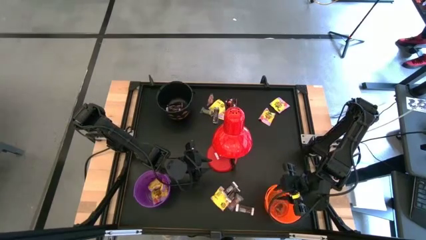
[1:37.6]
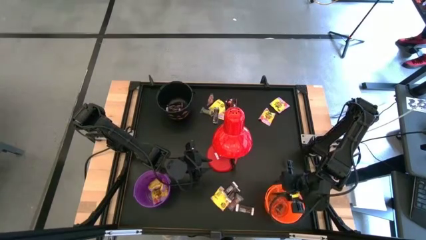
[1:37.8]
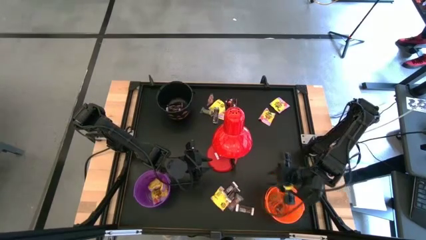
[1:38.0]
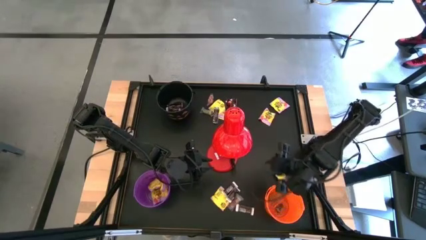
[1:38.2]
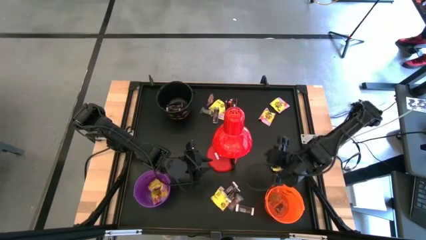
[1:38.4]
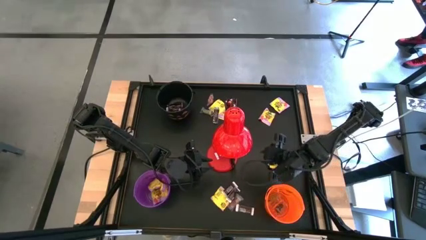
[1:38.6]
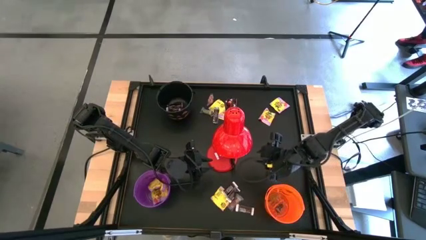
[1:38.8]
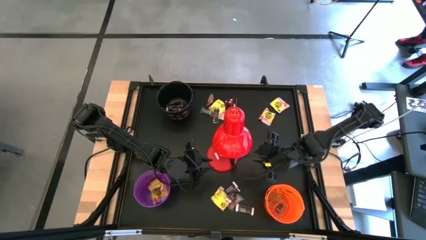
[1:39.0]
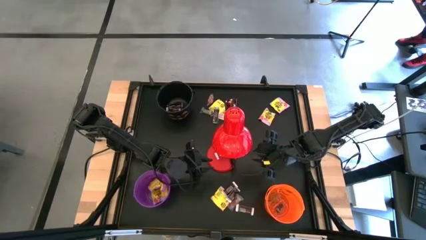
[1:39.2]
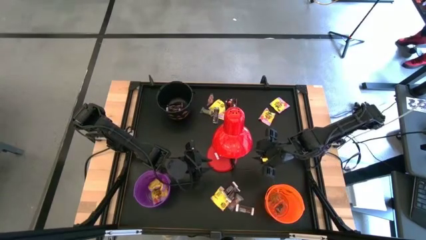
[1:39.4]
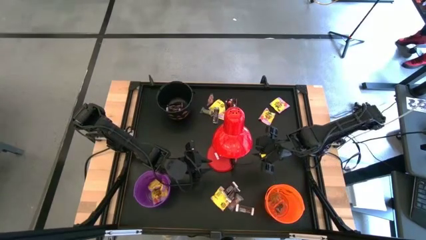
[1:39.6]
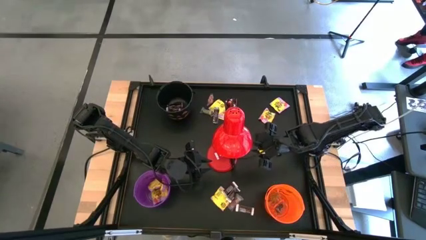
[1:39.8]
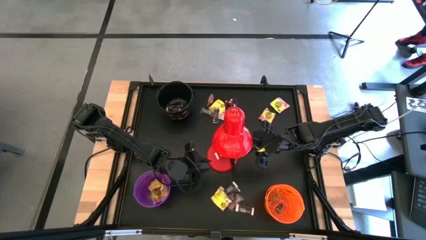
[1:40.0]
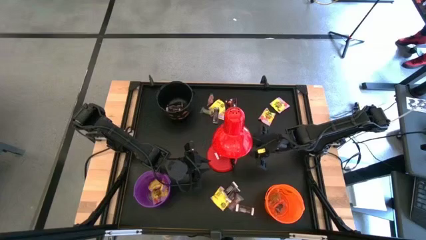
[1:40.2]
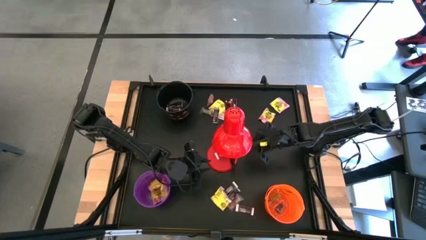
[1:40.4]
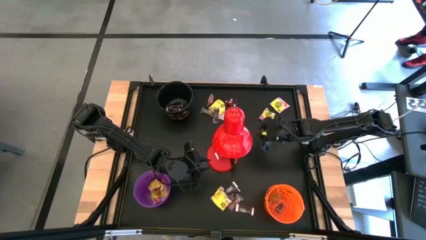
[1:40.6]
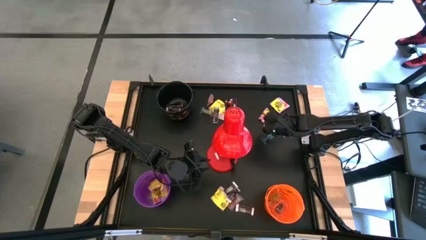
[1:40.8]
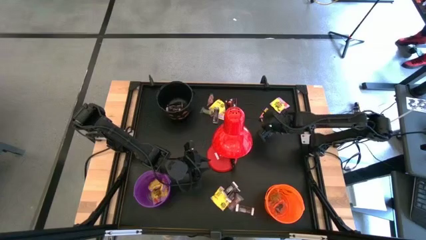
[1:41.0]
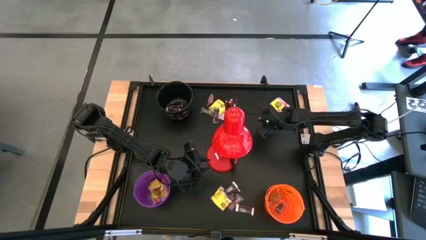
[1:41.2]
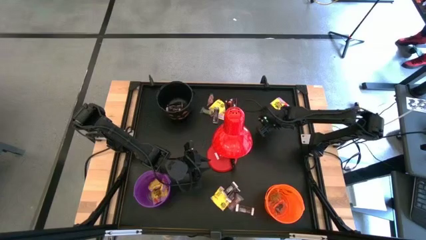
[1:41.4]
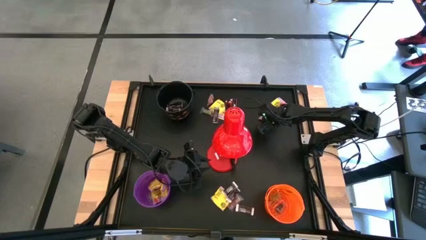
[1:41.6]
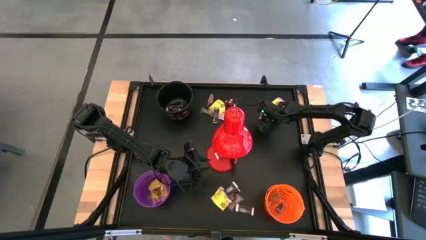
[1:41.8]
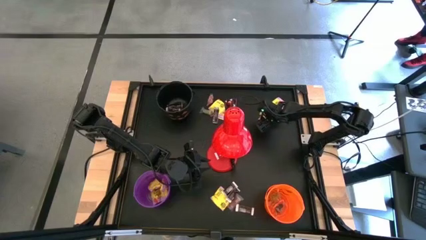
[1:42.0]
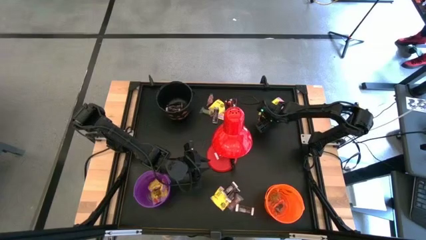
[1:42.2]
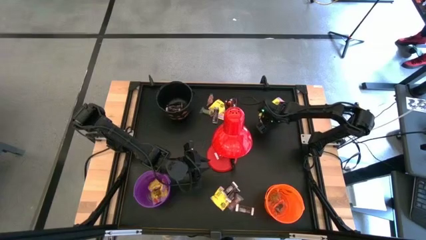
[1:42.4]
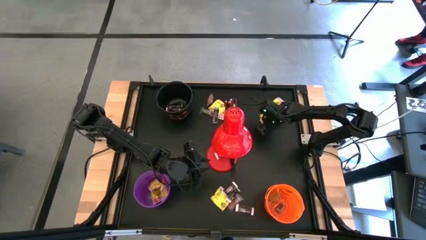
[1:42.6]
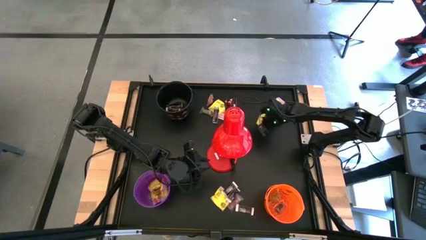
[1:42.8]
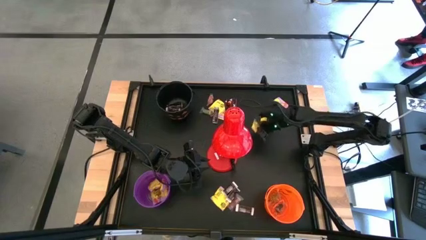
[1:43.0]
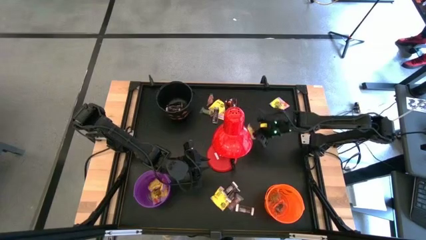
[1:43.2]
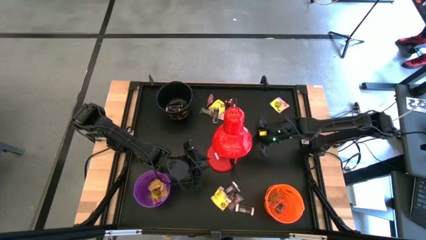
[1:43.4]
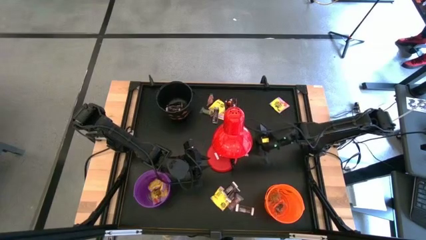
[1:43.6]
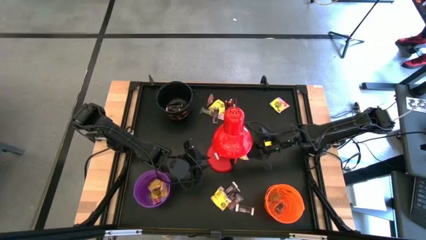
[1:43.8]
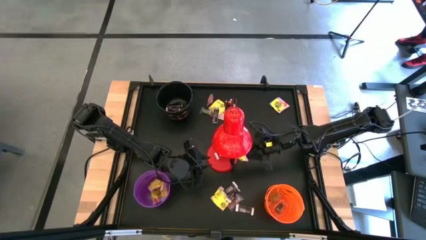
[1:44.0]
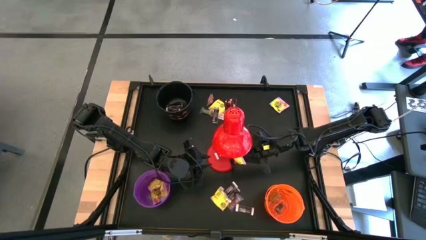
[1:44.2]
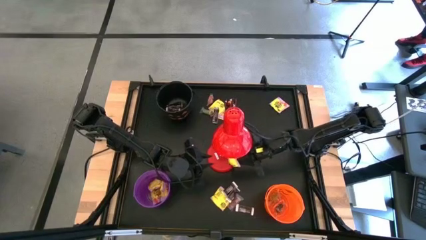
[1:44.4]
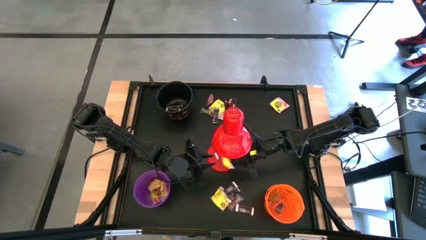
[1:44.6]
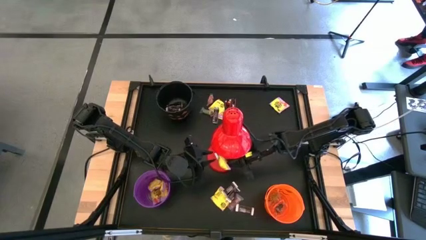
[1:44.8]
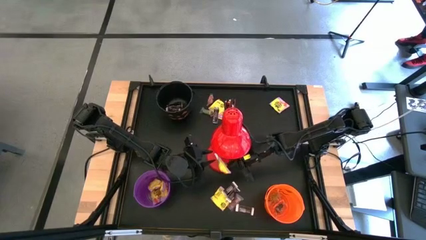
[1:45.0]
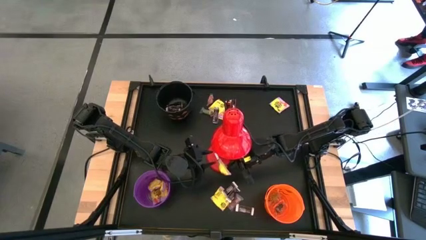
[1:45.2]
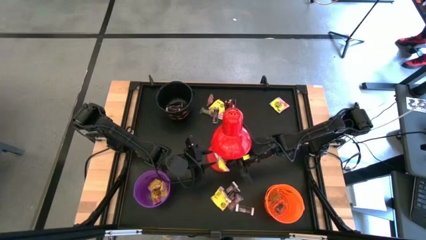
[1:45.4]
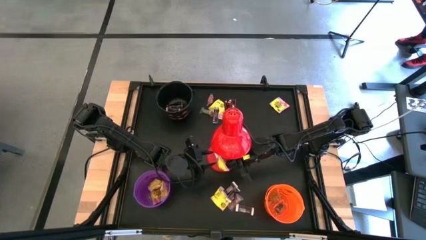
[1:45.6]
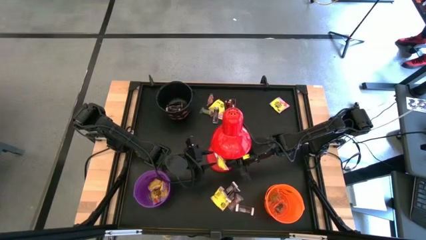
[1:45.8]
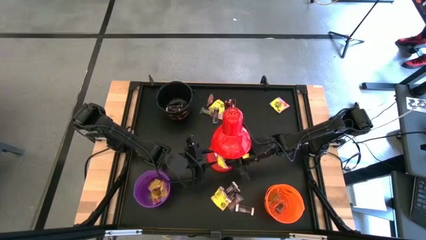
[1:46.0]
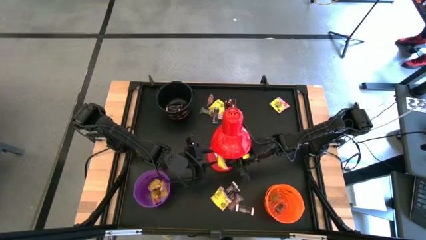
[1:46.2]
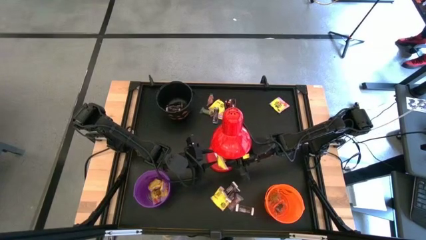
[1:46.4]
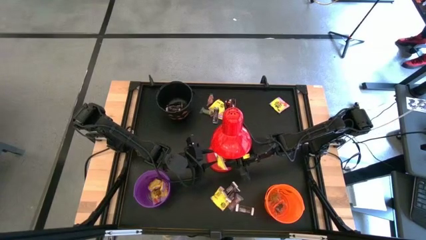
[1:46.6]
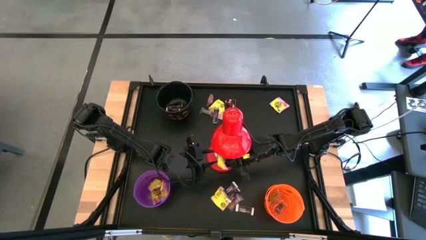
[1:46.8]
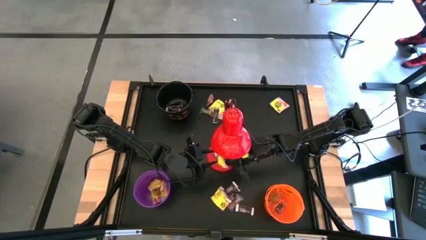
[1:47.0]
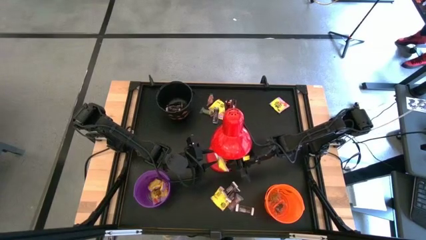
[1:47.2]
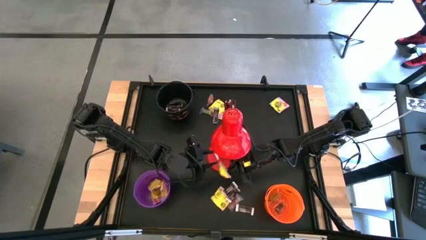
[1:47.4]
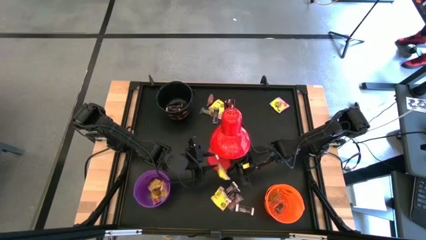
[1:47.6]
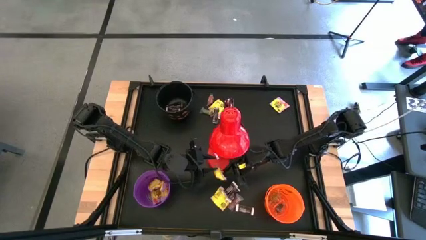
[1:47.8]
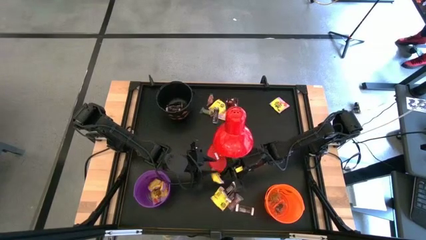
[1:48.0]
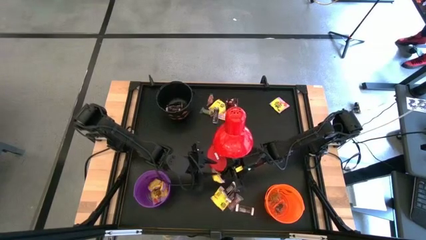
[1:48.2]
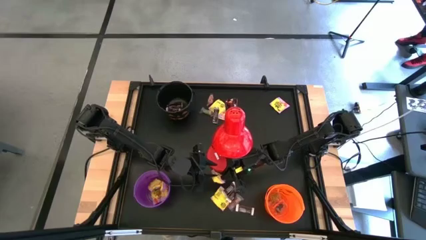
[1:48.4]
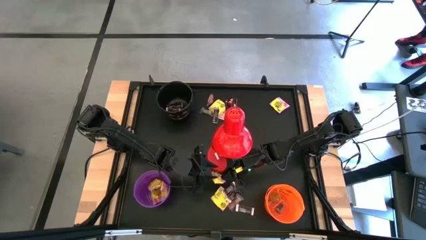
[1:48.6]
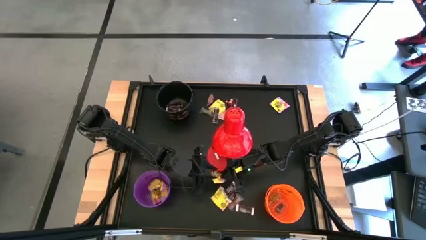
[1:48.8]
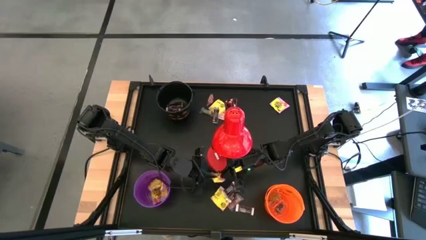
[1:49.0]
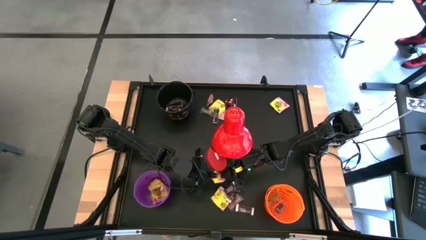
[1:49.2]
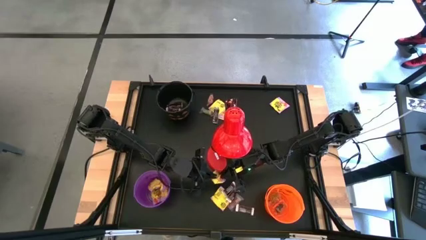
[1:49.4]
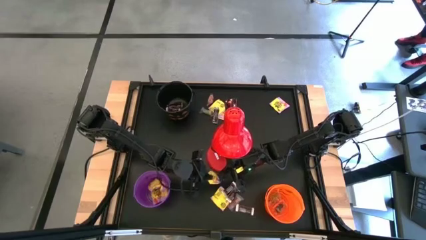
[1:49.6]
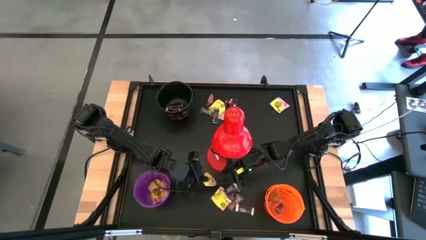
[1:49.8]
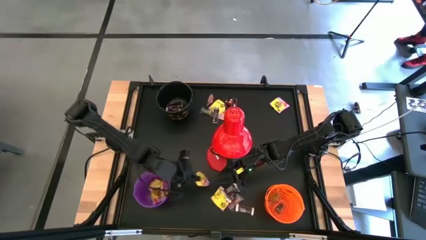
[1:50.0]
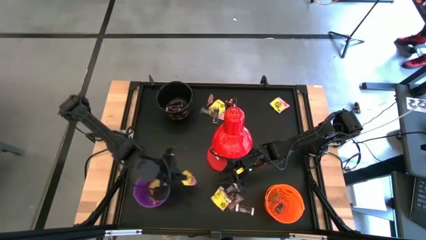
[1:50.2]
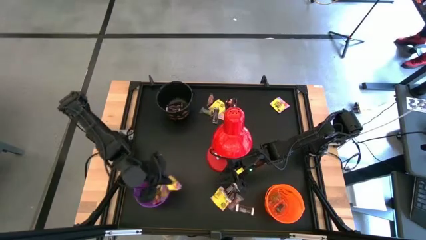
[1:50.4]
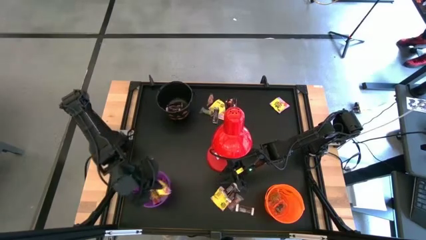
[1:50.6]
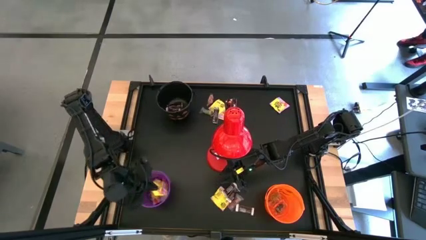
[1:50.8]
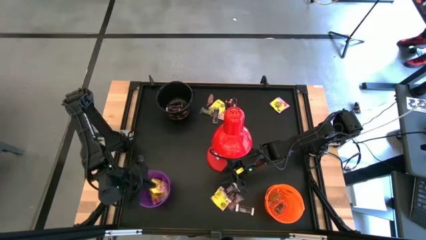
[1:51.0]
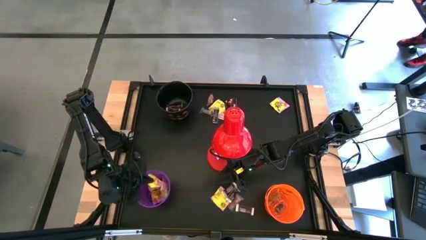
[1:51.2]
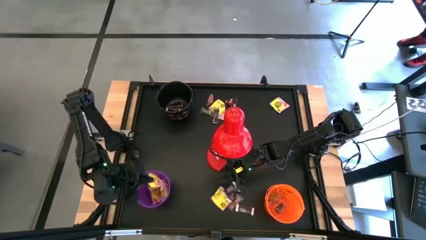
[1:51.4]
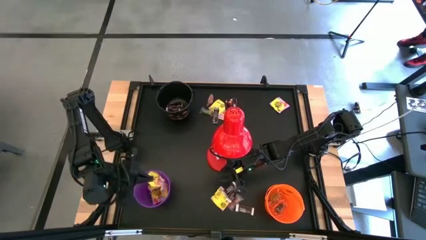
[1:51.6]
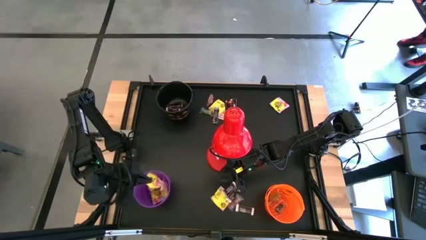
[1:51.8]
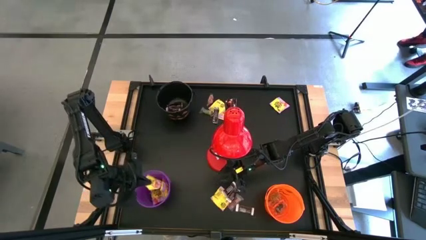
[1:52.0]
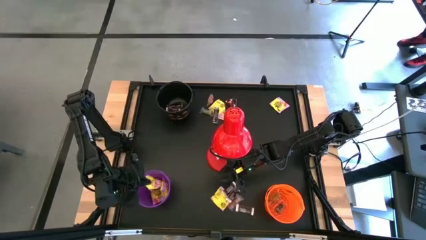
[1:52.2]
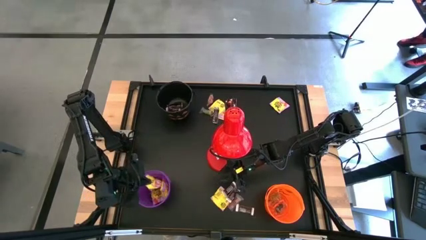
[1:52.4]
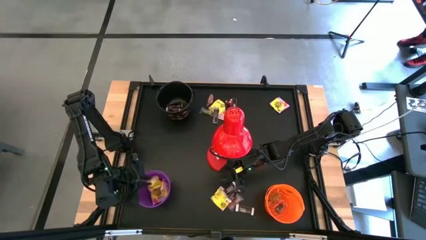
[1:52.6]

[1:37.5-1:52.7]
Task: Organize candy in baskets
Put the yellow candy into the violet bucket
